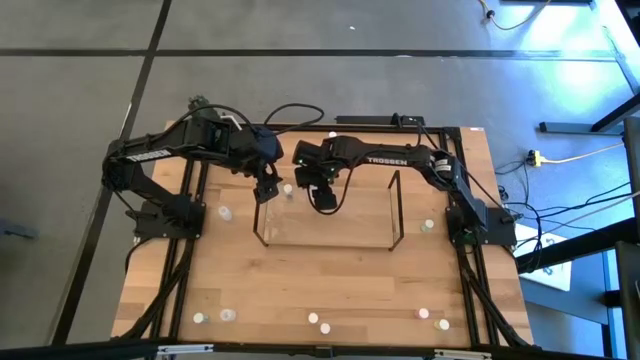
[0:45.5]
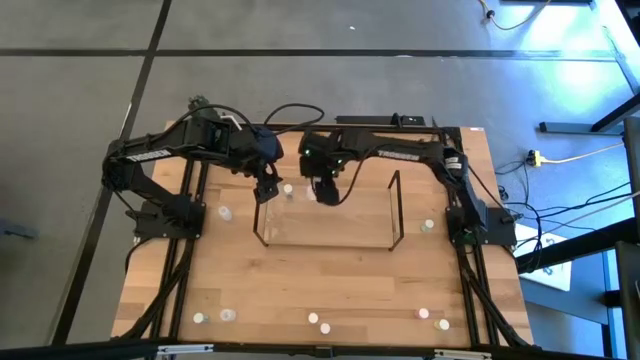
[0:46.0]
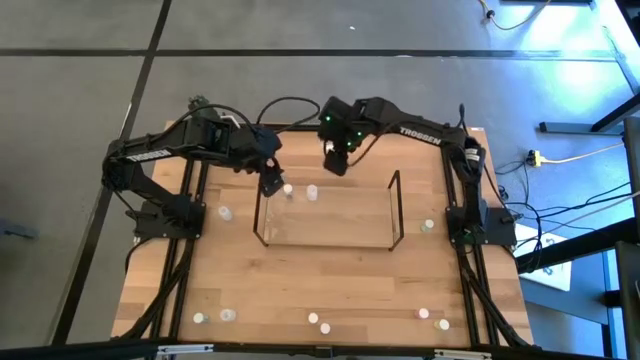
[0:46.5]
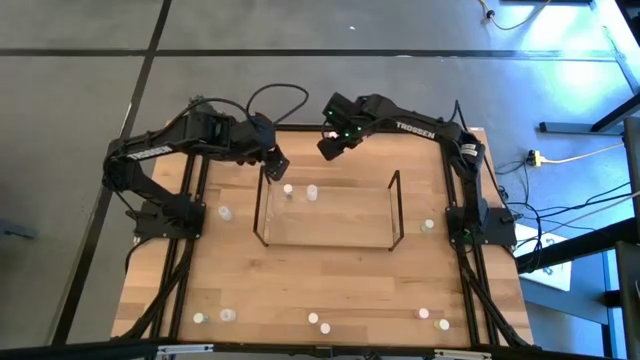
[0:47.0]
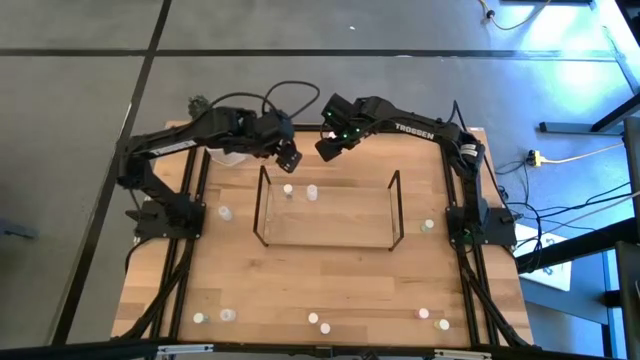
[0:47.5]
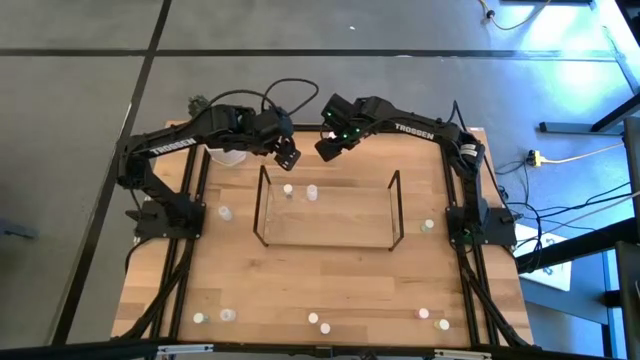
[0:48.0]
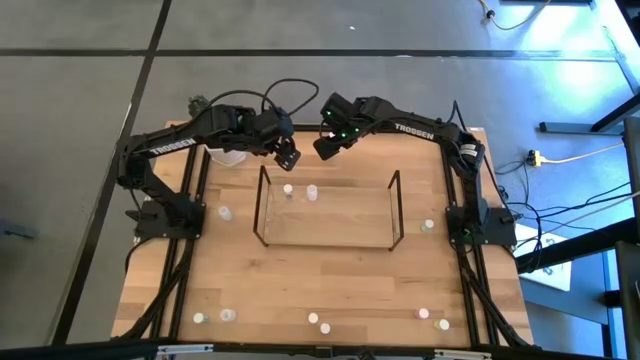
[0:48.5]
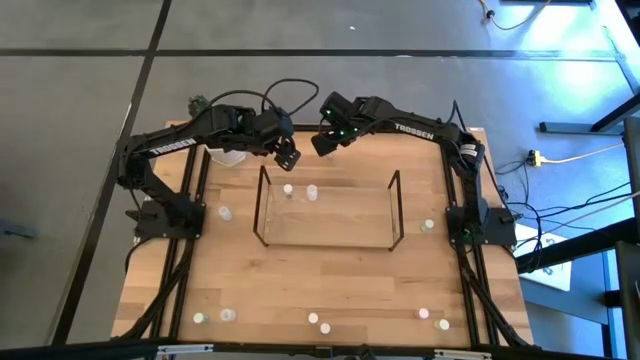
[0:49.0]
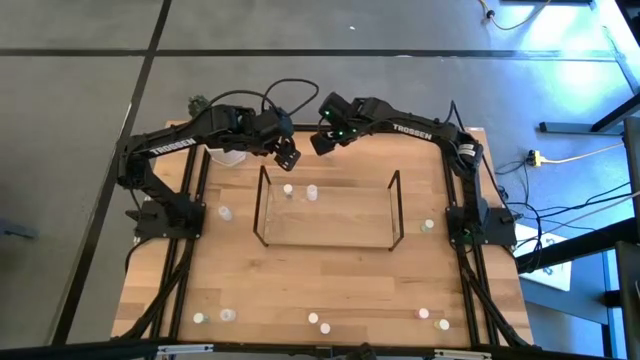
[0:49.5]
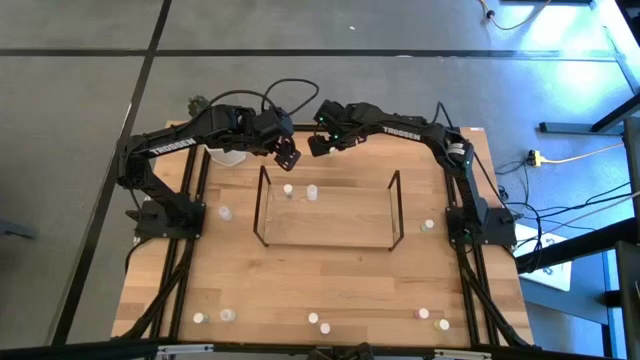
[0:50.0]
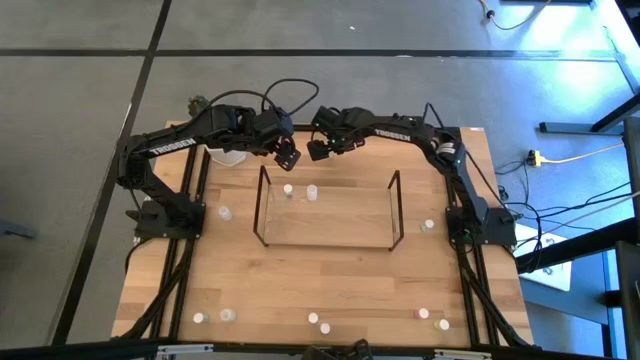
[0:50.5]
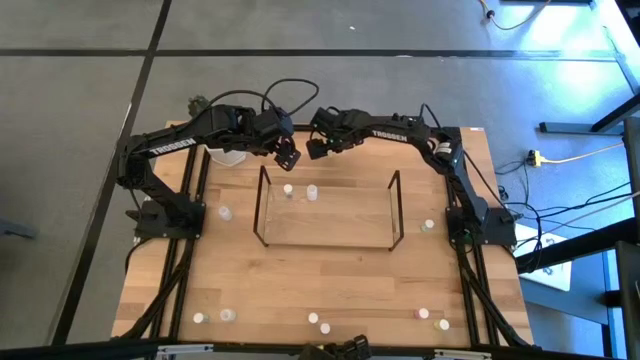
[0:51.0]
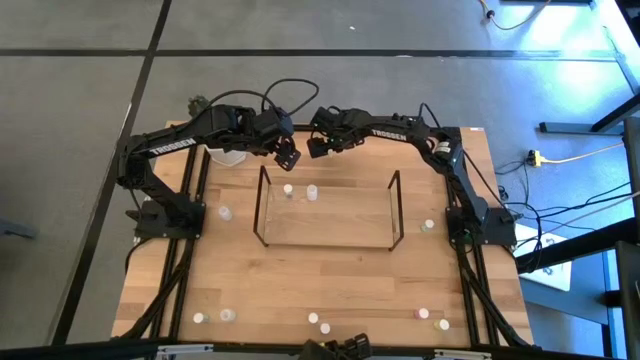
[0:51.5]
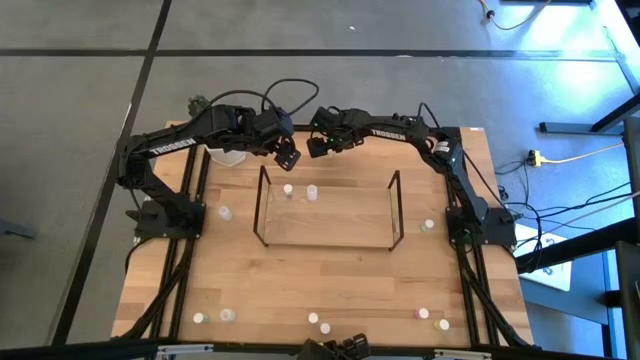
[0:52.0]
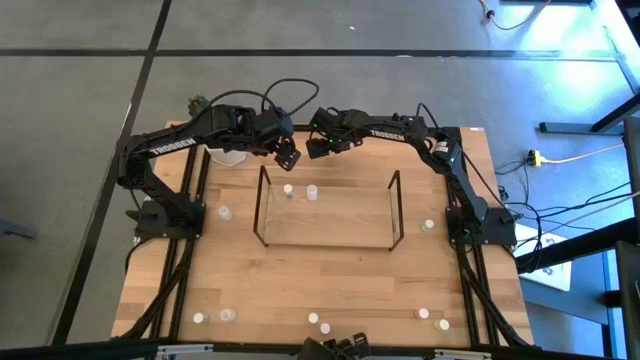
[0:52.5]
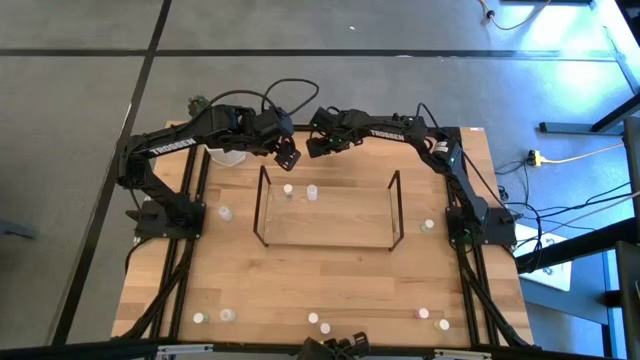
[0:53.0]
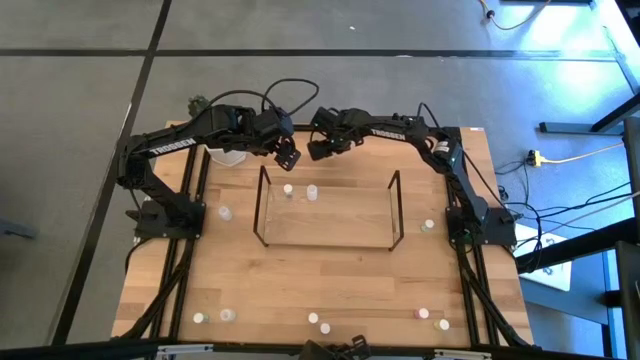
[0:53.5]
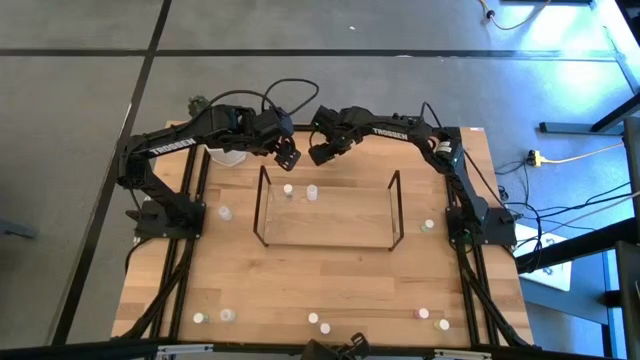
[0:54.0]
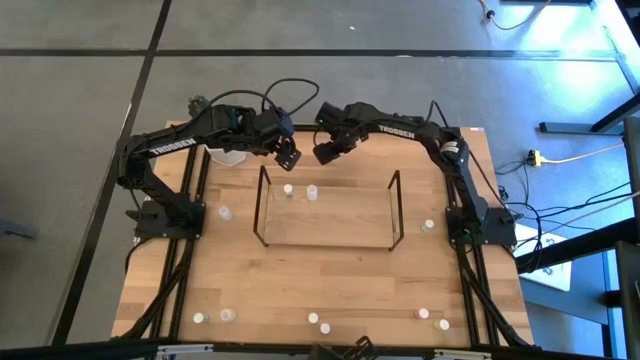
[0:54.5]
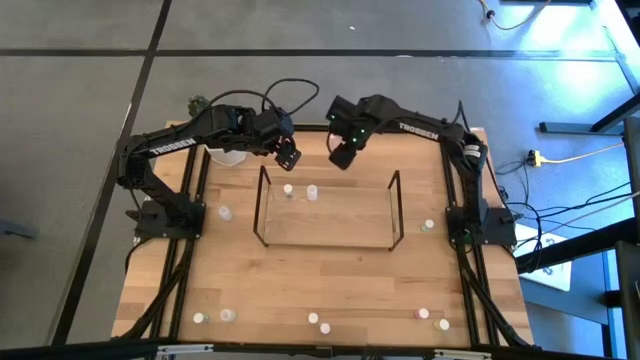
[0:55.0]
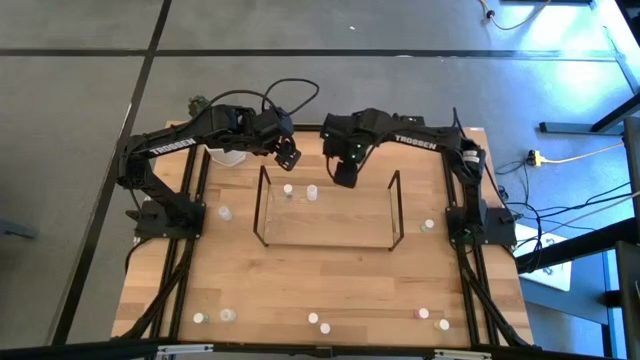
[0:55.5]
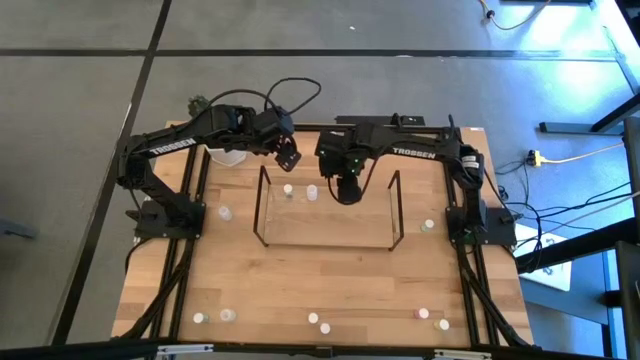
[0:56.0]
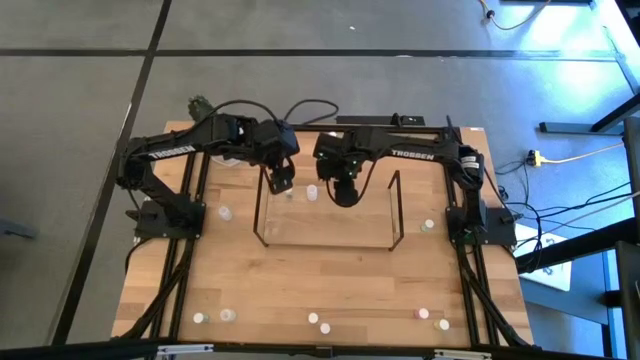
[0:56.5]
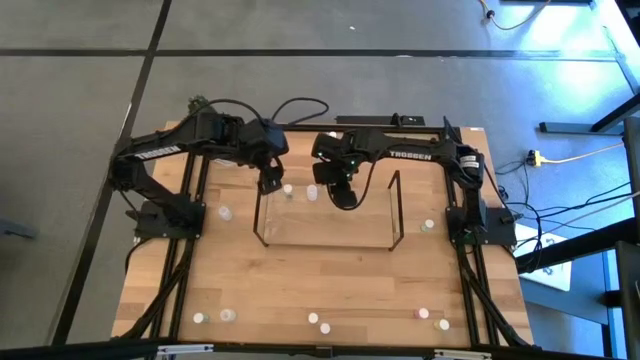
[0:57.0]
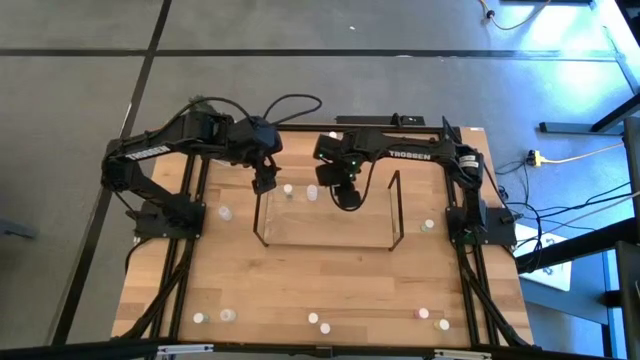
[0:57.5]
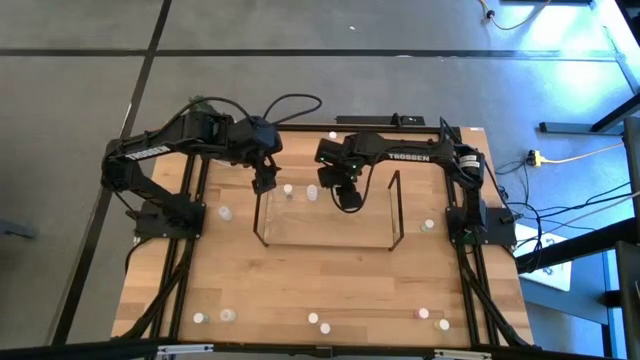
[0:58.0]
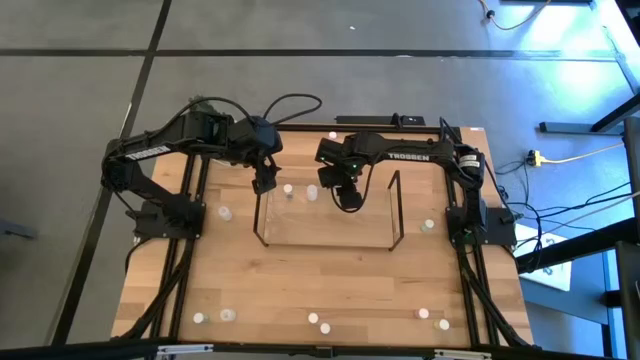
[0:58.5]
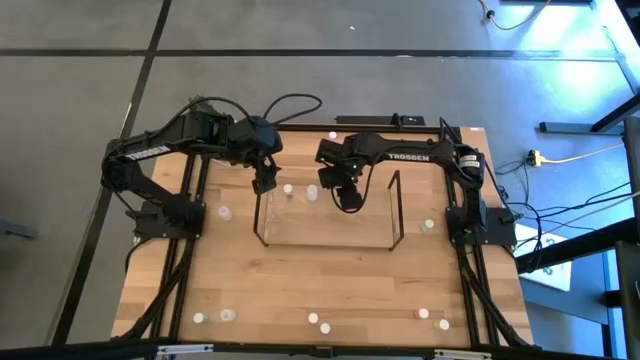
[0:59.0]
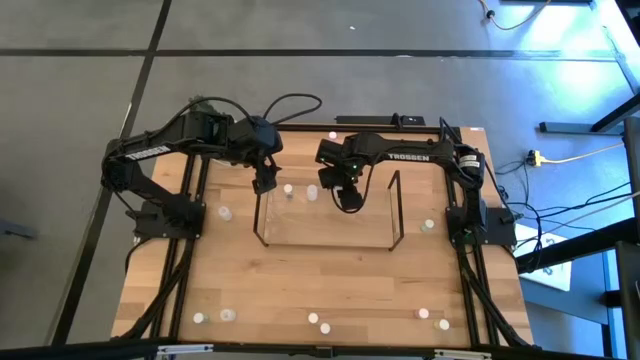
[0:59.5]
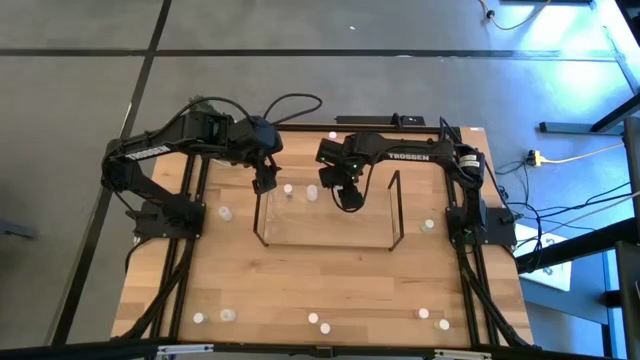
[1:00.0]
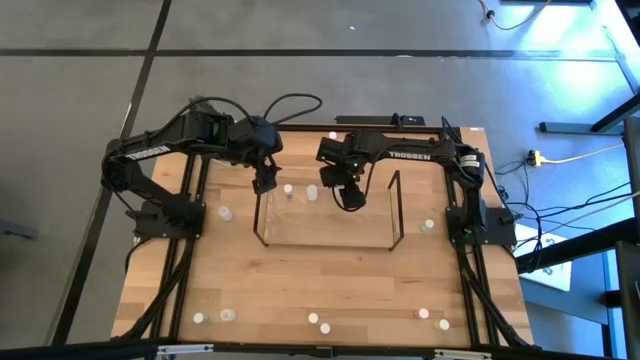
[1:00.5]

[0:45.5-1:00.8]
Task: Pick and place medicine bottles onto shelf by color
Put the top yellow pill bottle on the shelf

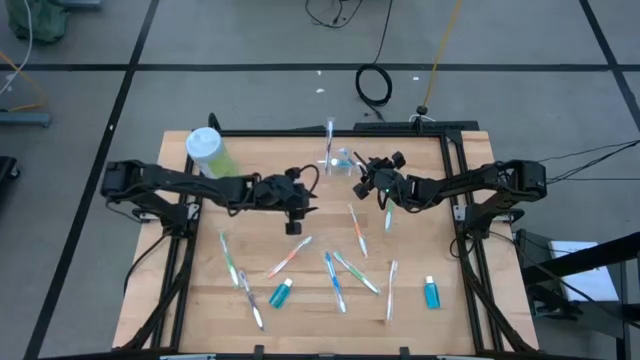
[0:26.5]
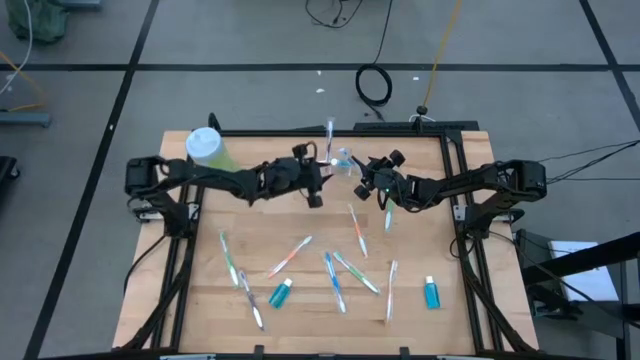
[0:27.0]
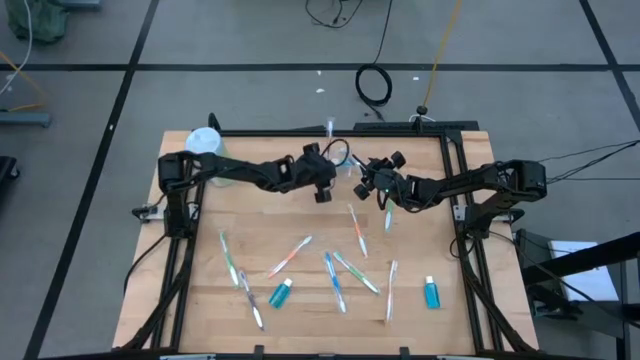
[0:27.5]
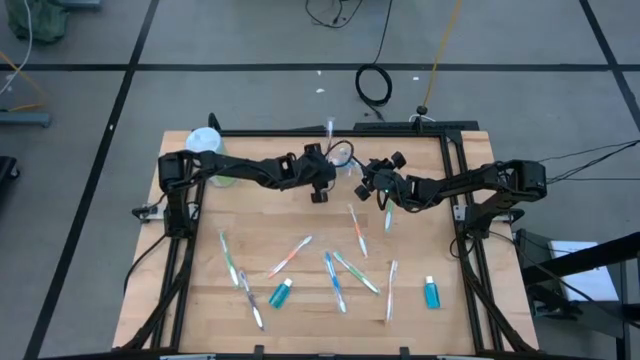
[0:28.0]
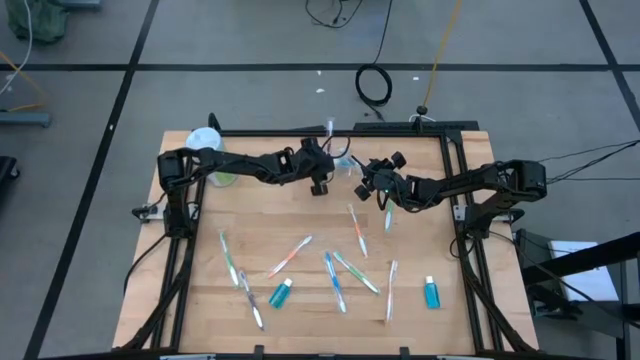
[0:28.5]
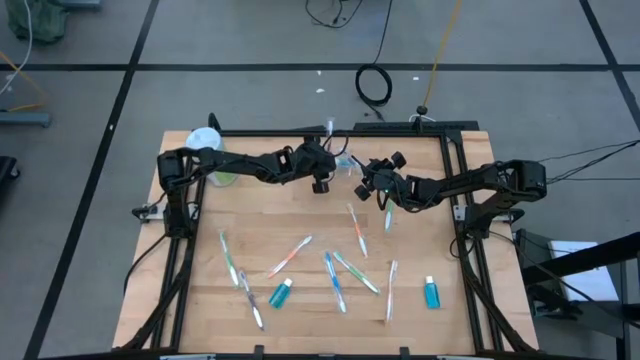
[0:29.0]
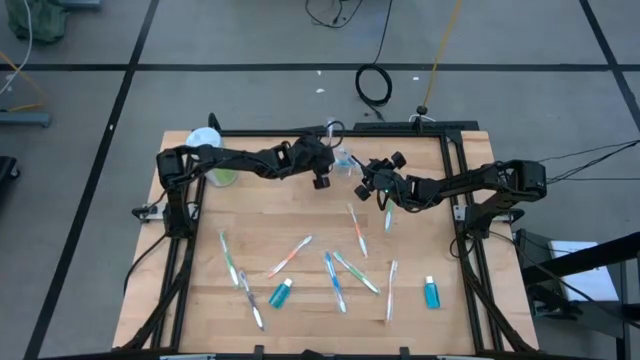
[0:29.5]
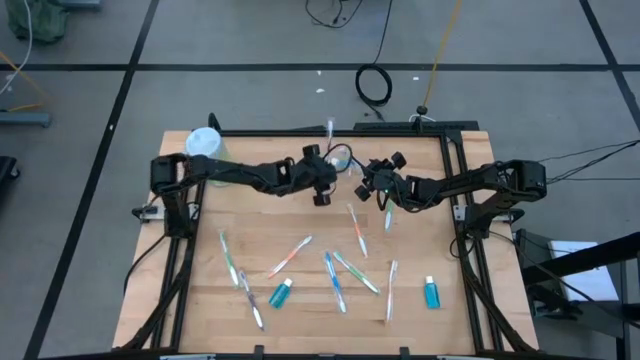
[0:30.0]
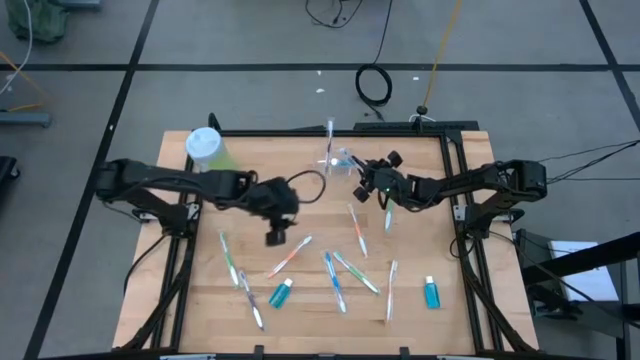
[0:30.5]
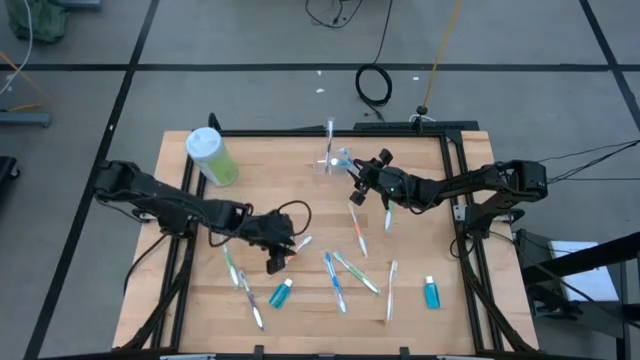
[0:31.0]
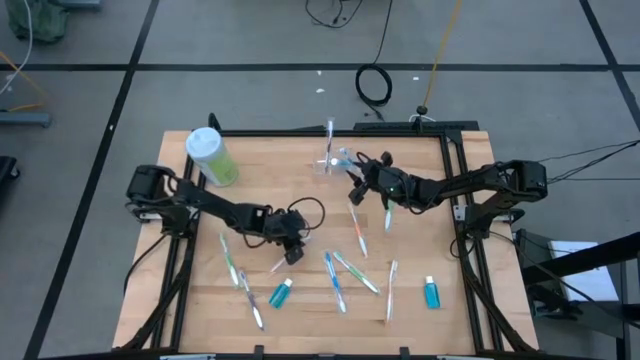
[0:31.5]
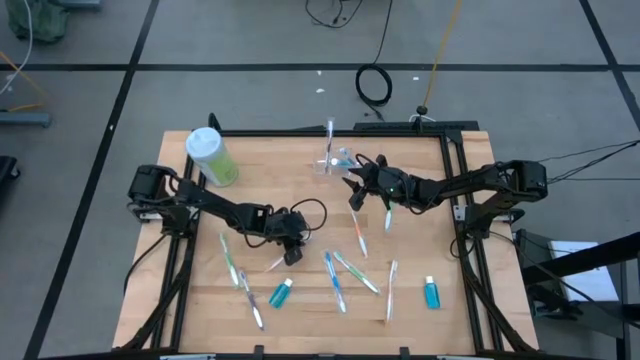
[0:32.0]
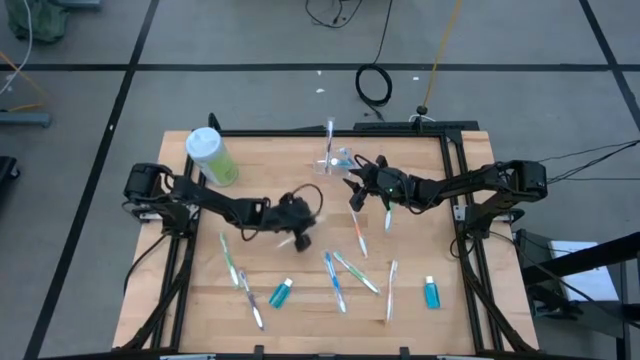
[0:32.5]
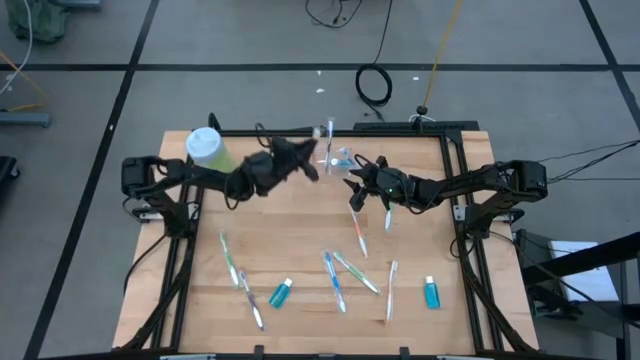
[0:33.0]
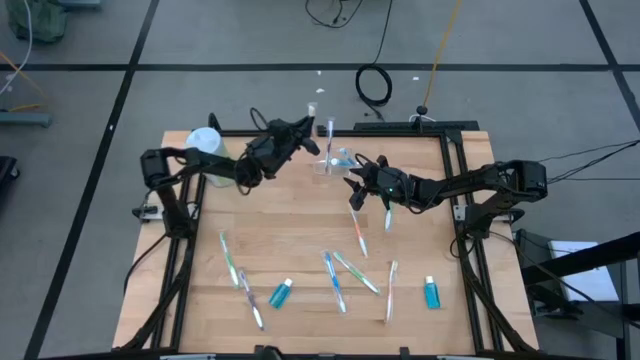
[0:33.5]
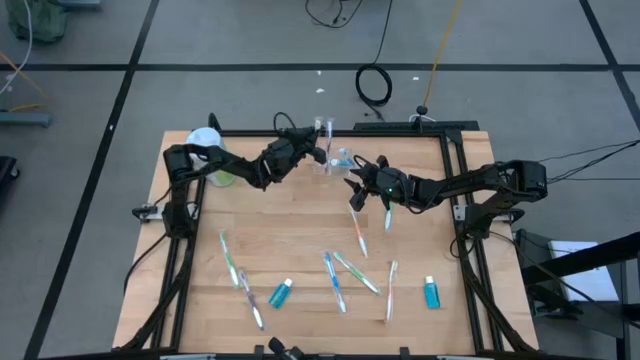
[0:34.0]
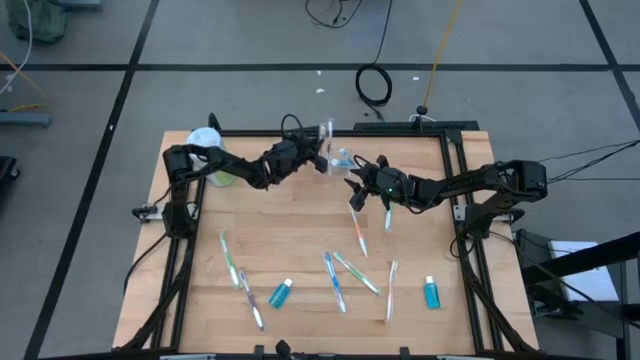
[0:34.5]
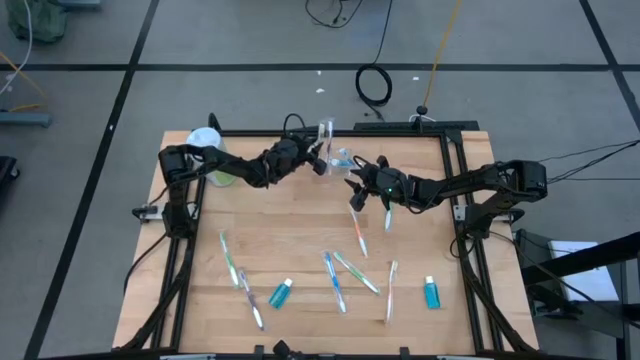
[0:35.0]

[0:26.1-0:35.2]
Task: Pick & Place toothbrushing station
Put the left orange toothbrush into the transparent organizer
